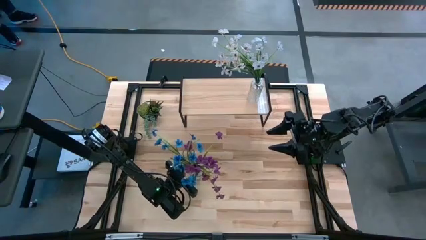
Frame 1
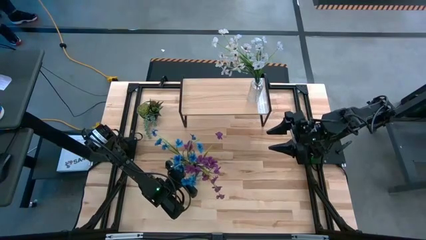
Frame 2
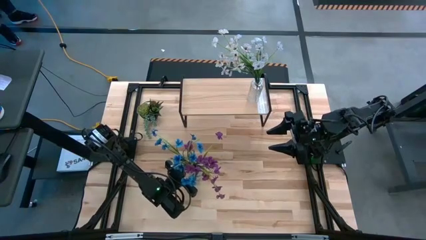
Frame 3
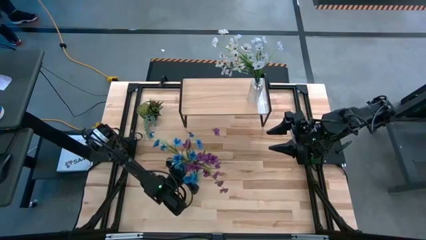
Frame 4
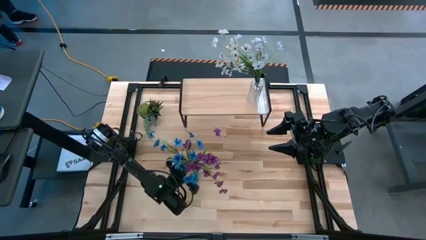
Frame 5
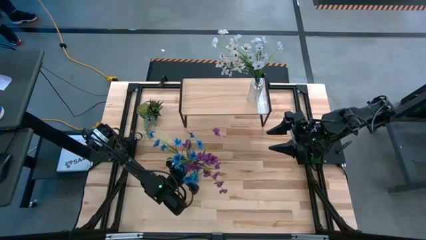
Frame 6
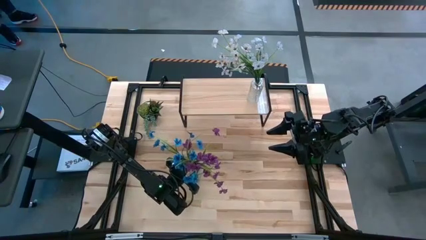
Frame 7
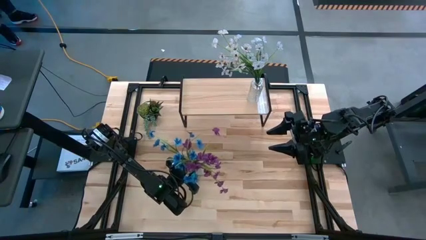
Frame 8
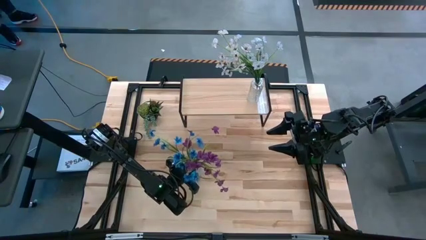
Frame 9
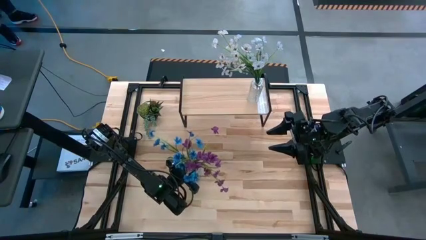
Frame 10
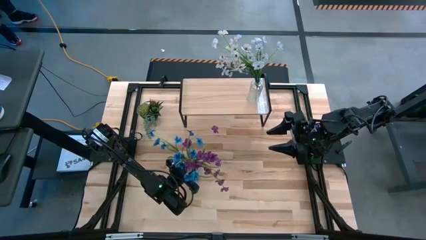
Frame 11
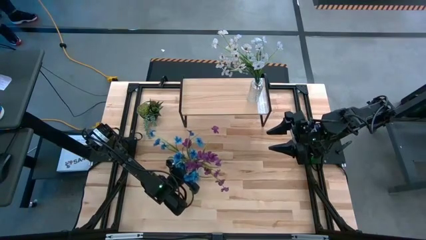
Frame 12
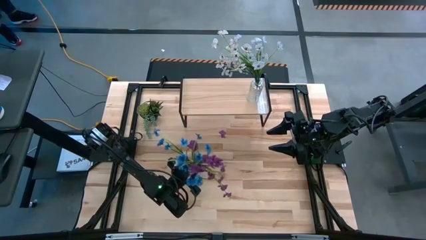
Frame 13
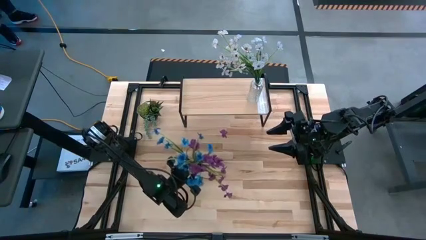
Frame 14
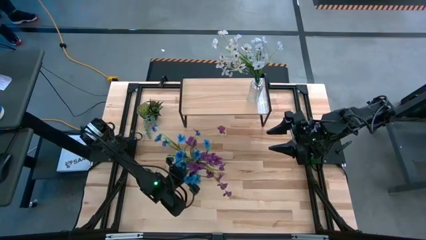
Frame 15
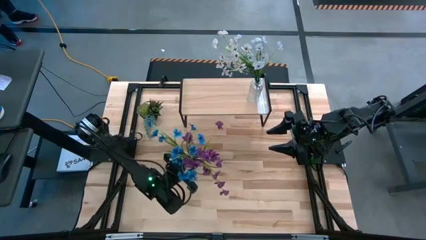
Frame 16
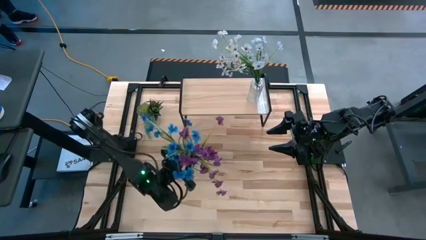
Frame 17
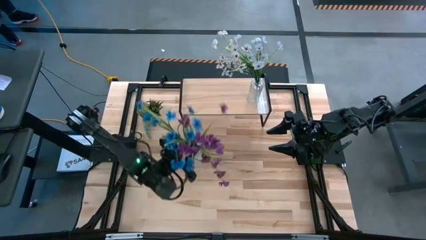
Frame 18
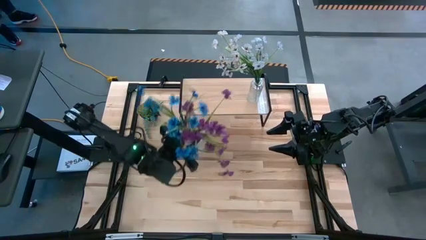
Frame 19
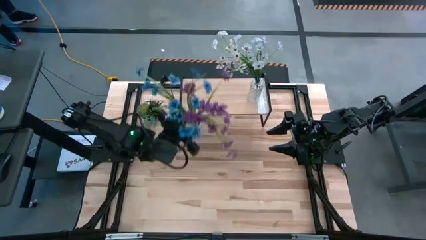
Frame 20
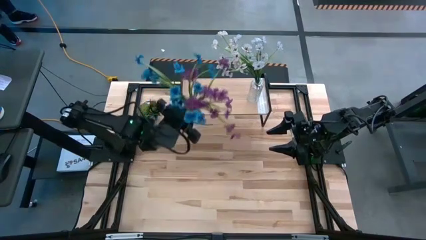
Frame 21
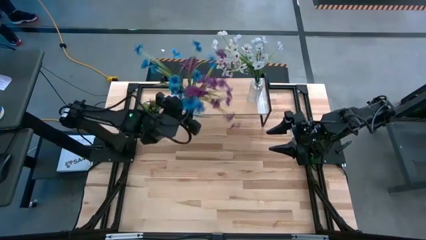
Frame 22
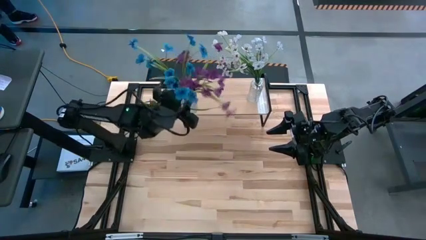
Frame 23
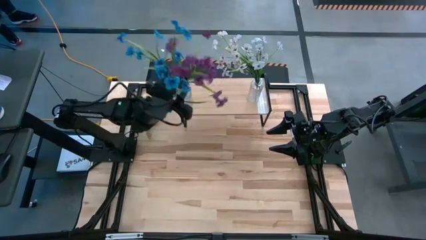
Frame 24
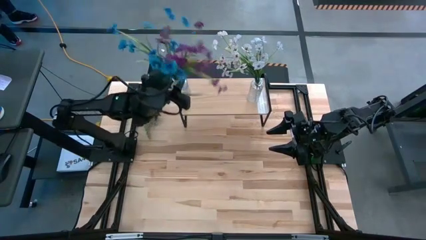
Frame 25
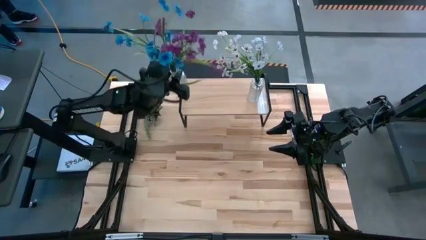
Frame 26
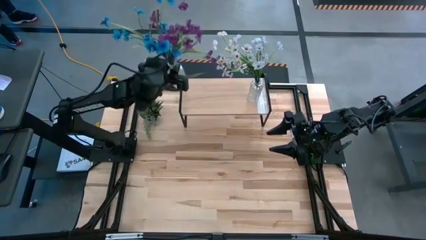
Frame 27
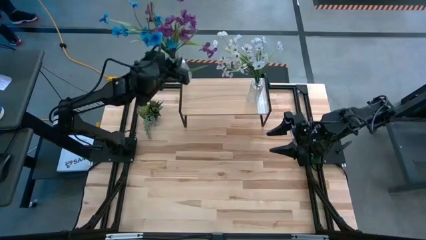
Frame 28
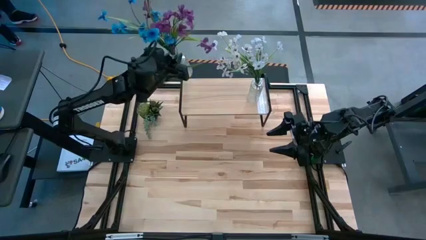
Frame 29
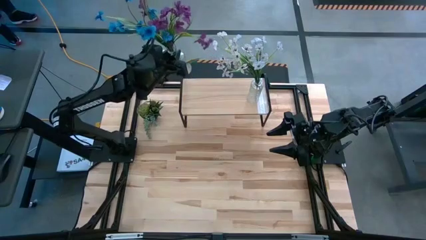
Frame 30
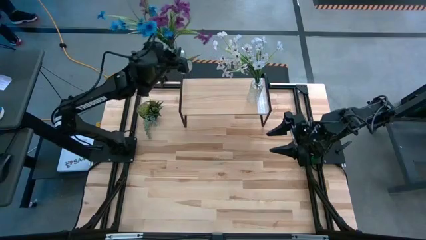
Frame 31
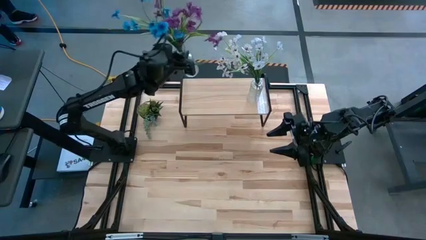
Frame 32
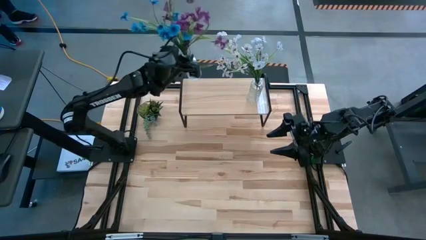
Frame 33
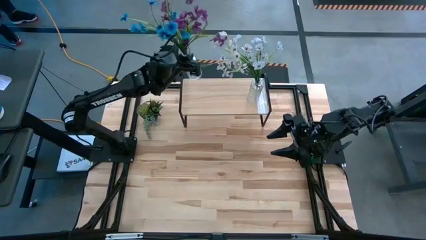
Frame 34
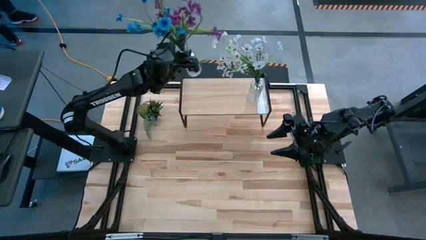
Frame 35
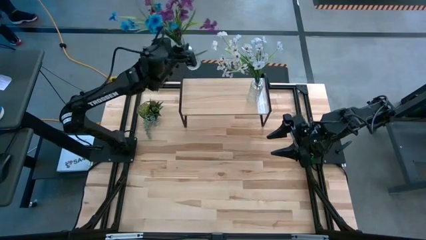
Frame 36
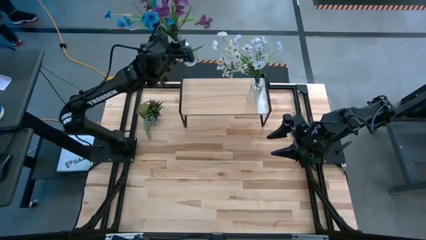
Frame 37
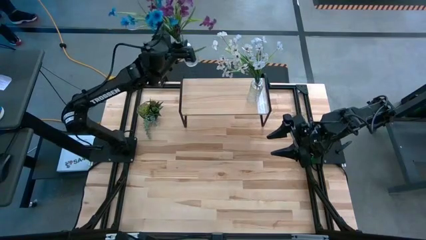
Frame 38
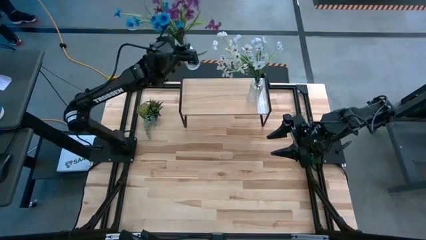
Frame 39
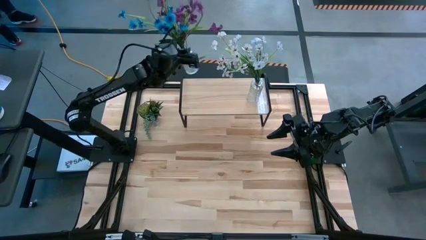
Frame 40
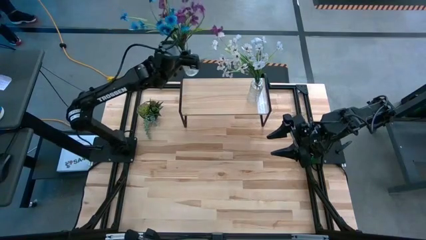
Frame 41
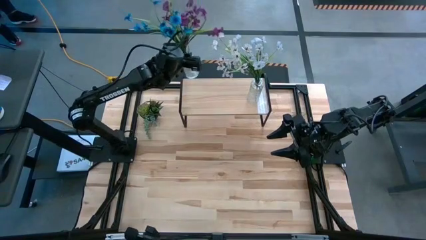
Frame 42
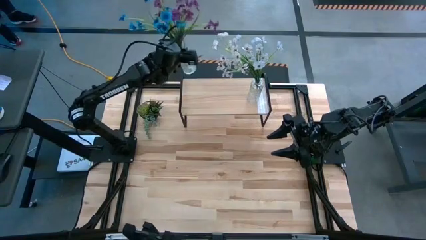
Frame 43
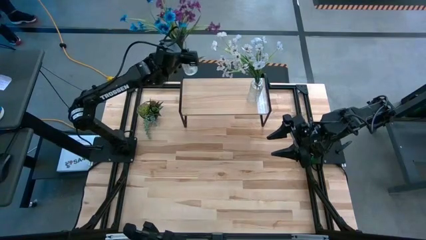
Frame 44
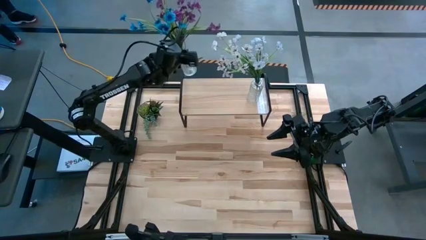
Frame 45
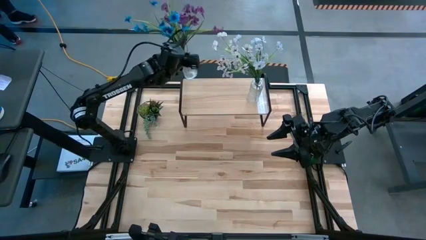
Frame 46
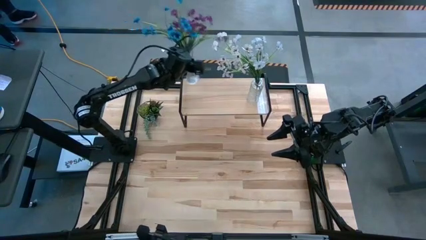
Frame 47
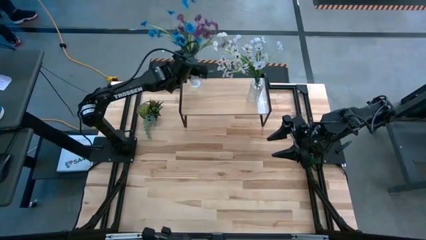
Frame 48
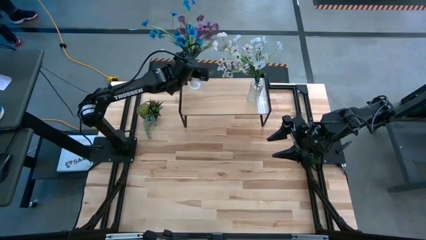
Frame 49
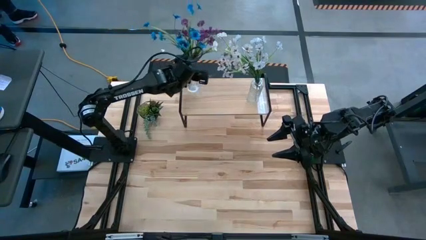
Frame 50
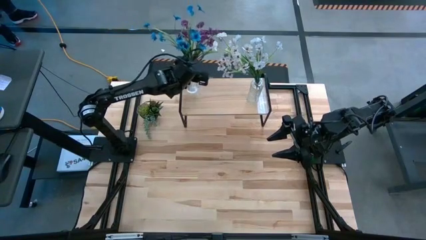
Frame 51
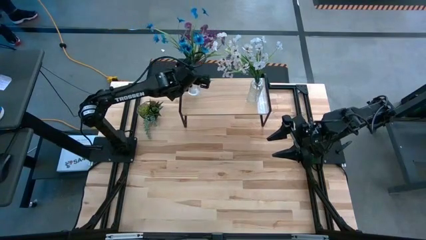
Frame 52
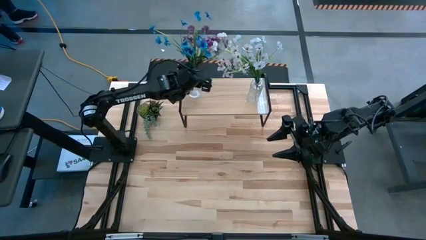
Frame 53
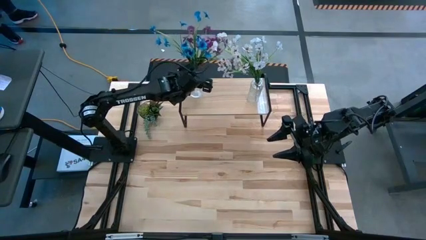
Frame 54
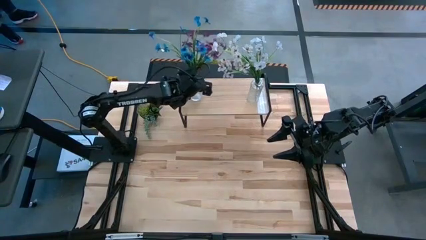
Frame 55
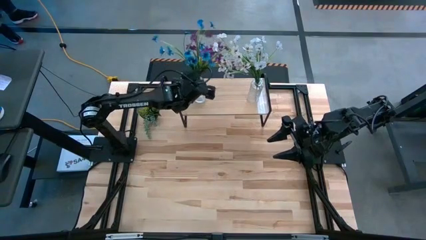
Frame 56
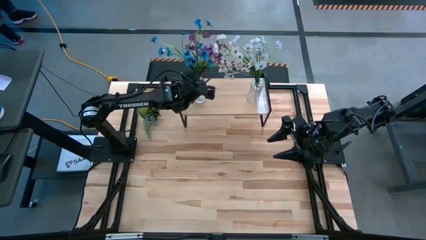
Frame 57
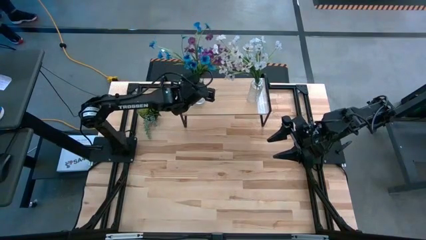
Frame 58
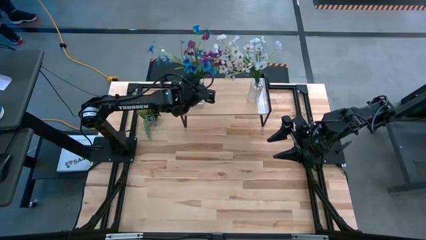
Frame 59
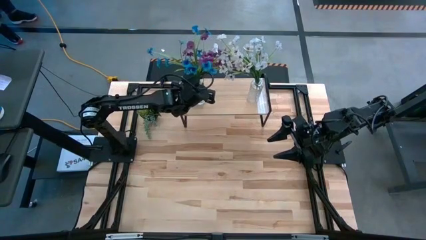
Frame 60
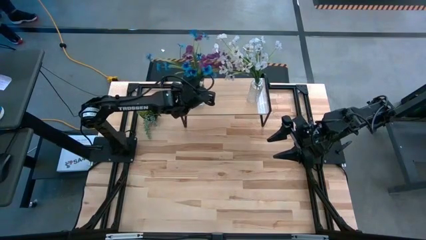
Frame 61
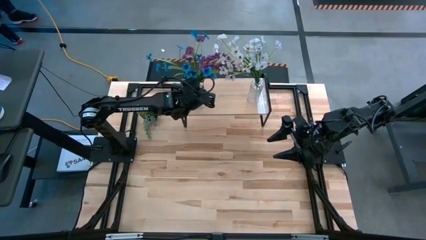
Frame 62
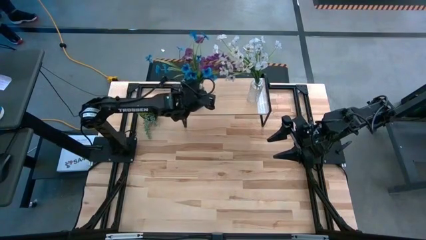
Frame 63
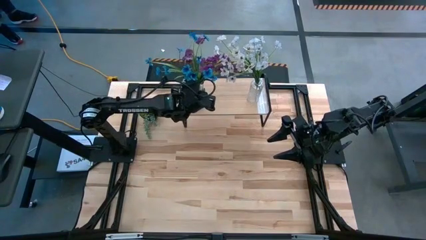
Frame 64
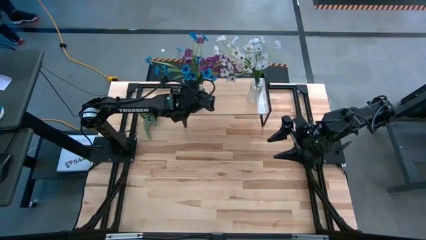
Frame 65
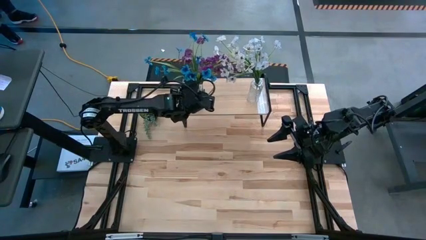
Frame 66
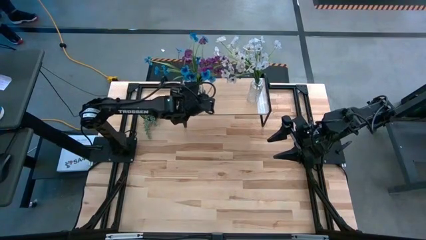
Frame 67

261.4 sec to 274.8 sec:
Task: Pick and place flowers into a vace then onto a shelf
Put the transparent vase with flowers on the shelf

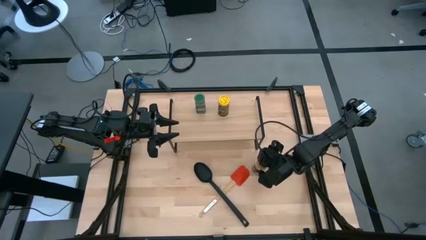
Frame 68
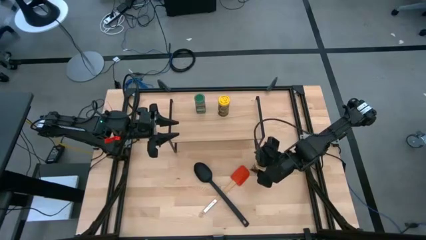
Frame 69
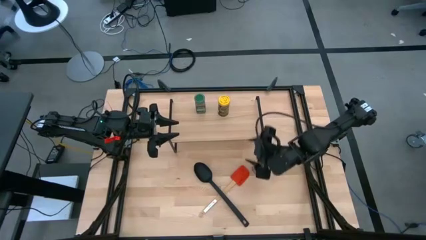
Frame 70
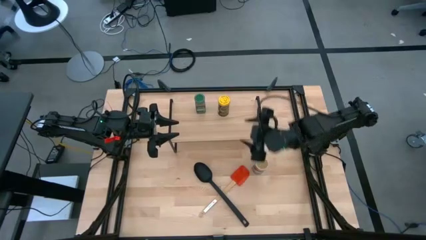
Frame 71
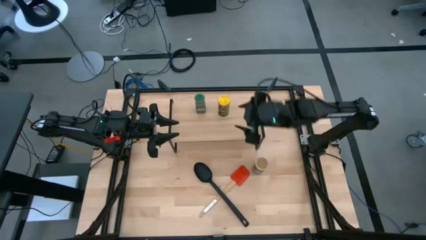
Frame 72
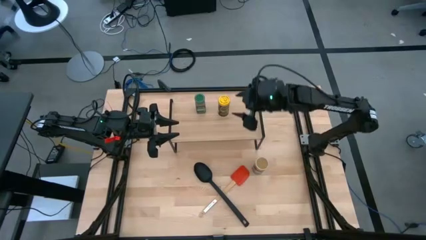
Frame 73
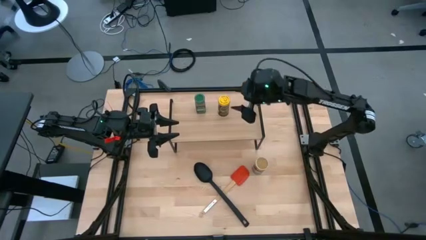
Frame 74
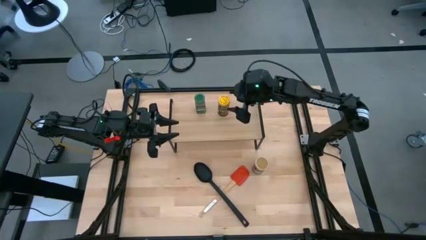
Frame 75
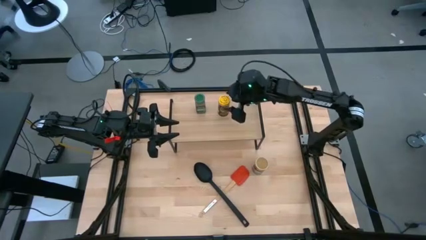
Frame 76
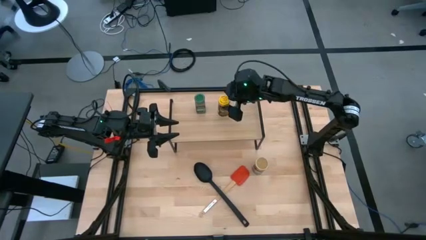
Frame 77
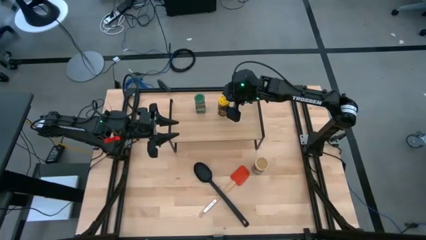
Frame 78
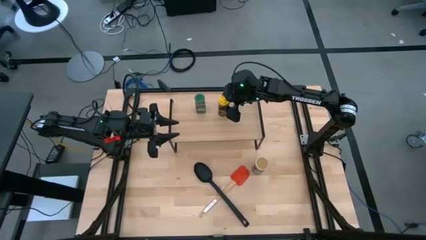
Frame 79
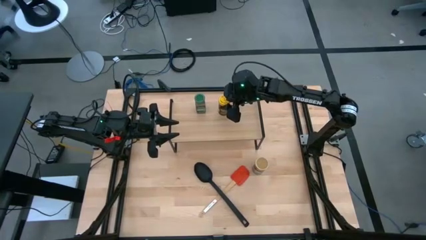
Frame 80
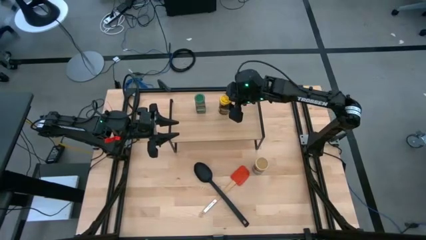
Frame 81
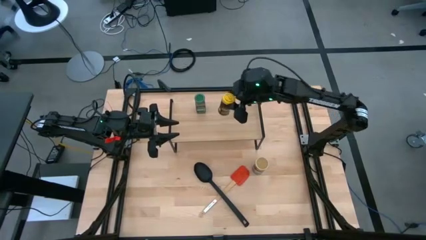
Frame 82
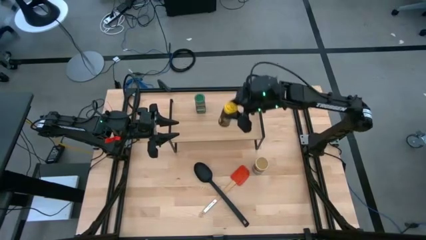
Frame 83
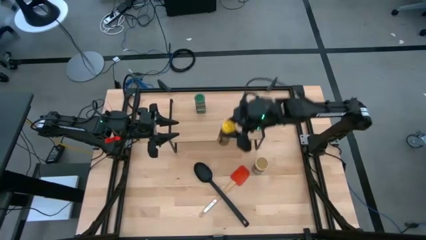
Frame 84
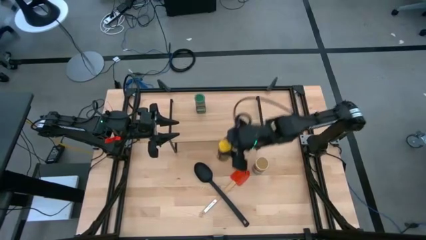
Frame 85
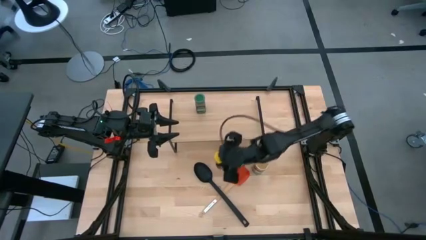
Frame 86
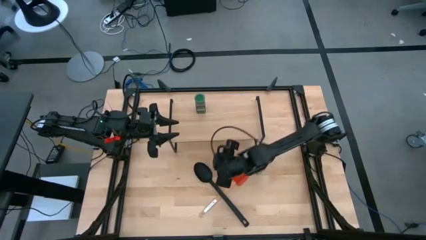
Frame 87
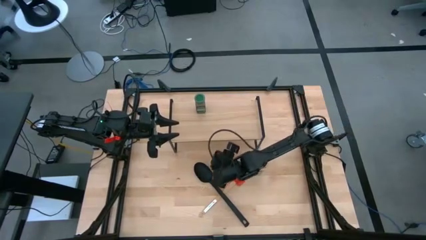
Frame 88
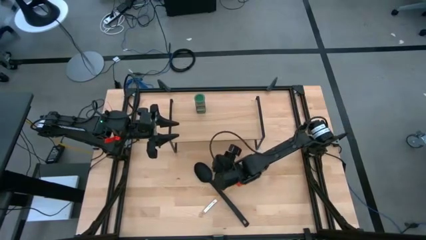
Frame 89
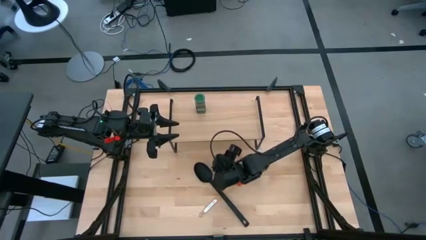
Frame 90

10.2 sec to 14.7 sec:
Task: Shelf spices
Remove the yellow seasoning bottle from the shelf
